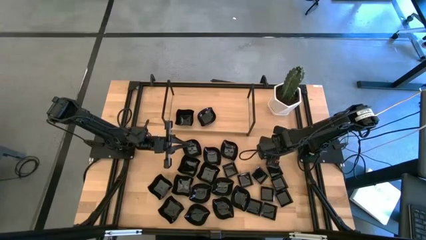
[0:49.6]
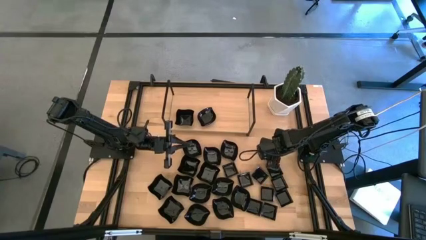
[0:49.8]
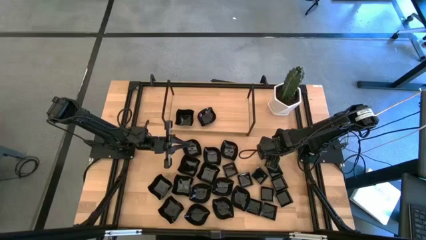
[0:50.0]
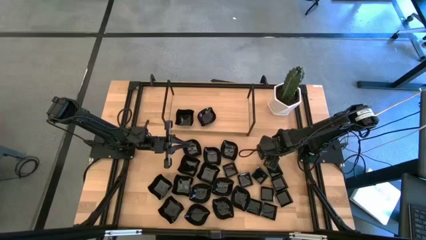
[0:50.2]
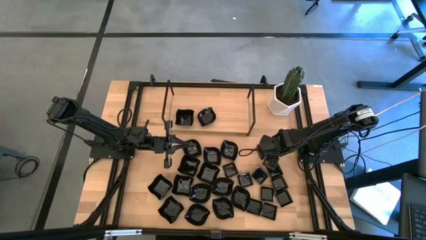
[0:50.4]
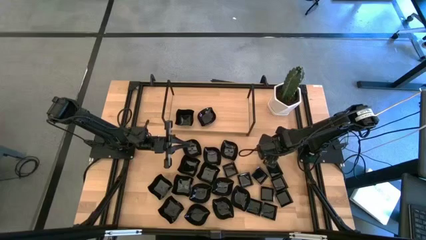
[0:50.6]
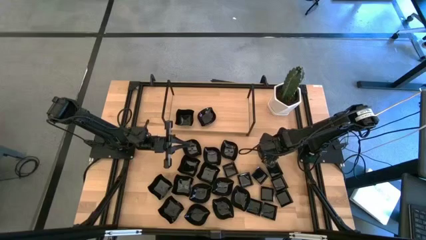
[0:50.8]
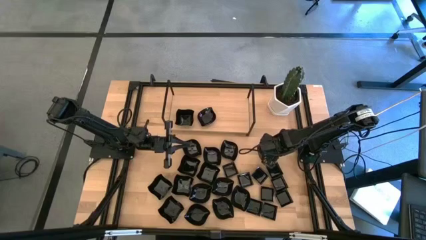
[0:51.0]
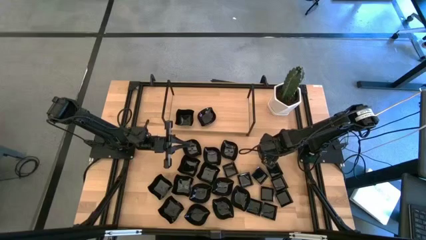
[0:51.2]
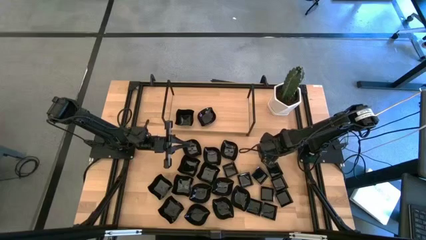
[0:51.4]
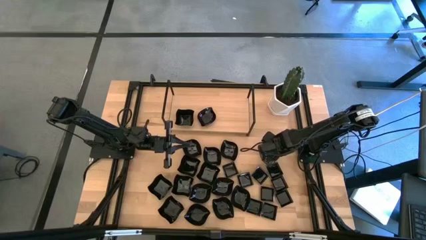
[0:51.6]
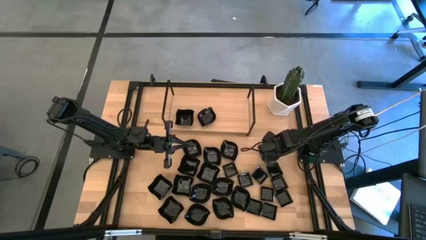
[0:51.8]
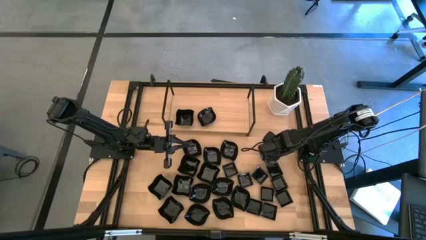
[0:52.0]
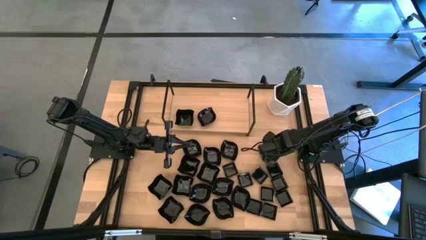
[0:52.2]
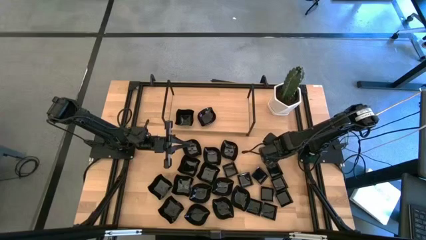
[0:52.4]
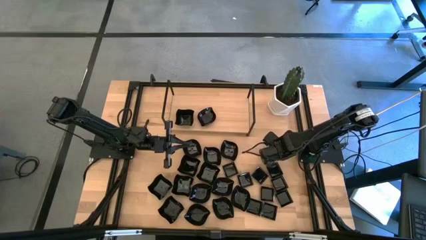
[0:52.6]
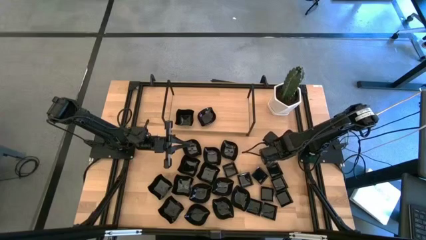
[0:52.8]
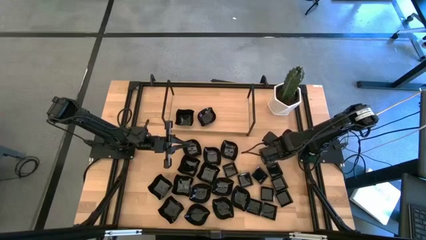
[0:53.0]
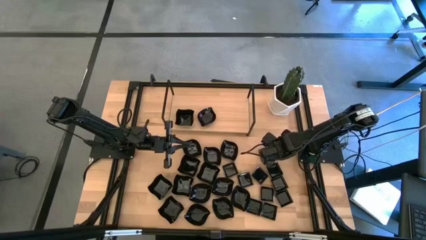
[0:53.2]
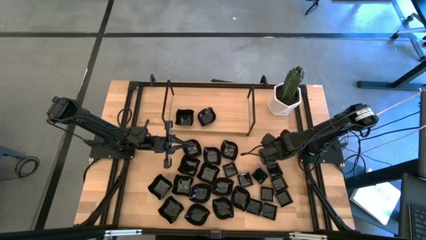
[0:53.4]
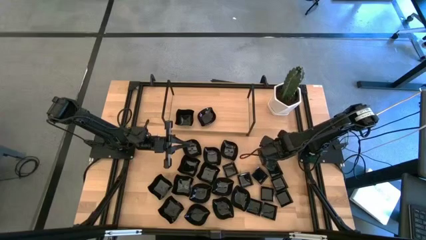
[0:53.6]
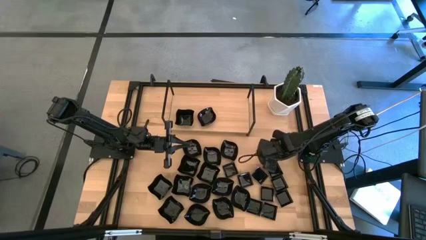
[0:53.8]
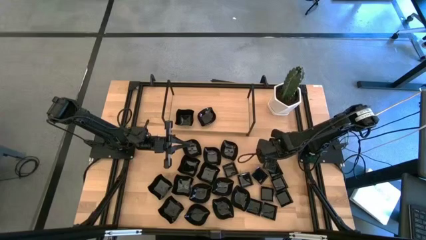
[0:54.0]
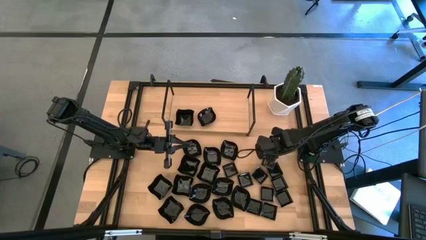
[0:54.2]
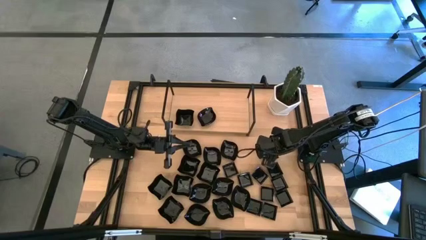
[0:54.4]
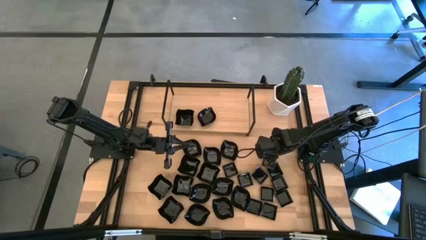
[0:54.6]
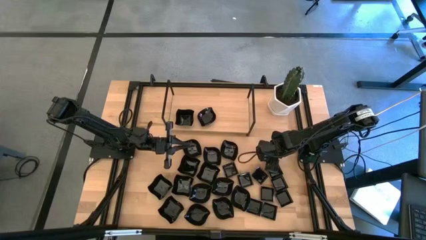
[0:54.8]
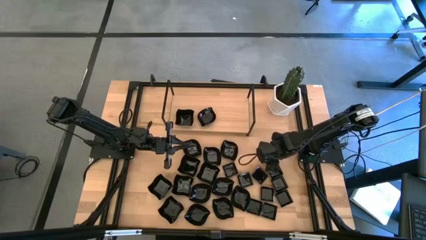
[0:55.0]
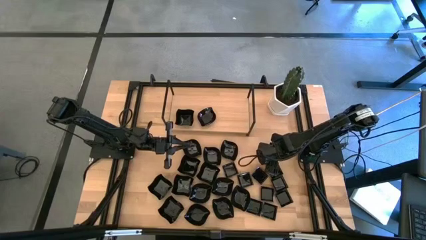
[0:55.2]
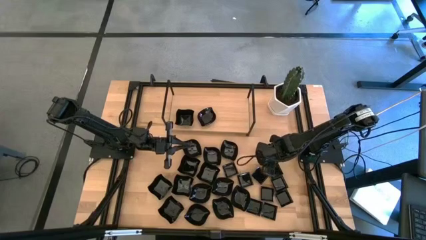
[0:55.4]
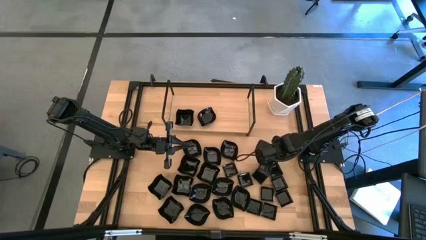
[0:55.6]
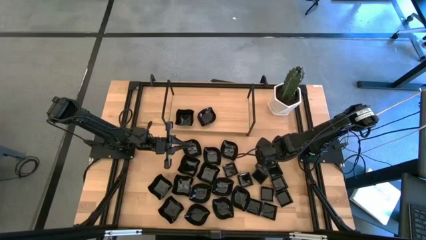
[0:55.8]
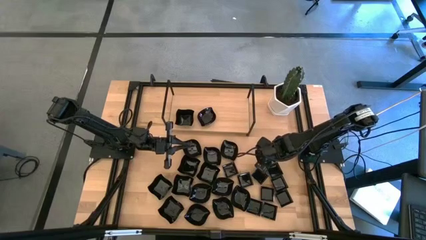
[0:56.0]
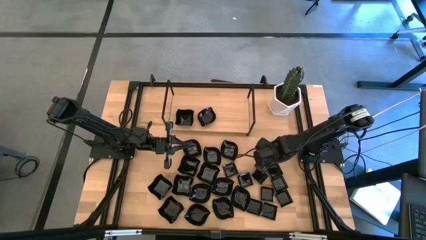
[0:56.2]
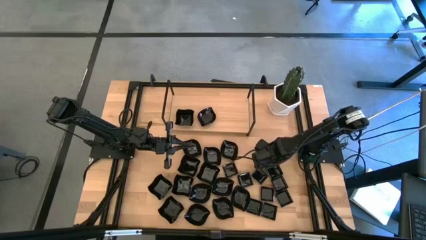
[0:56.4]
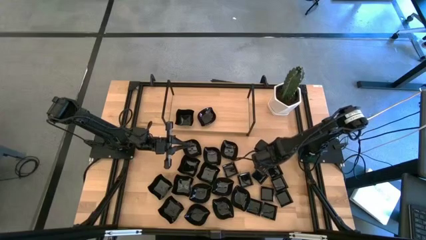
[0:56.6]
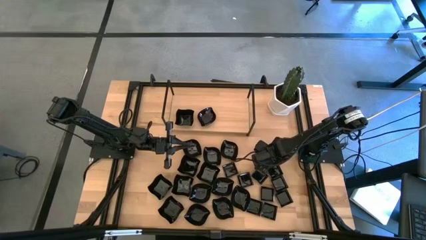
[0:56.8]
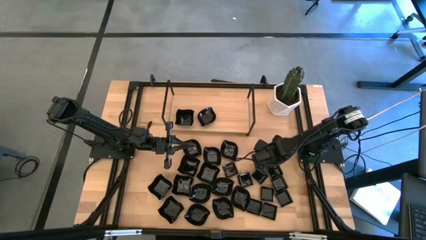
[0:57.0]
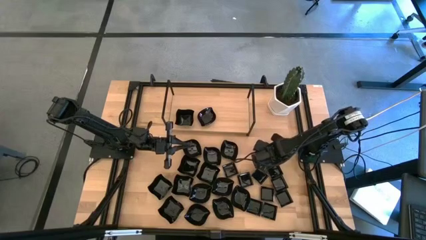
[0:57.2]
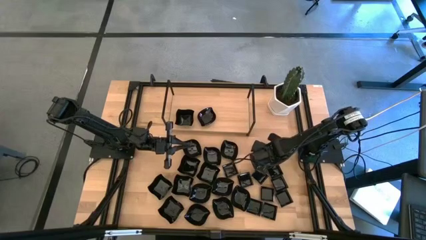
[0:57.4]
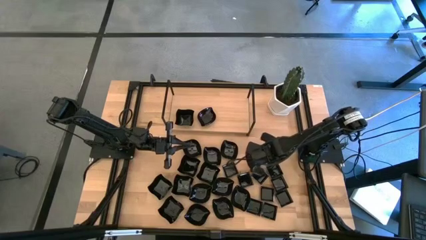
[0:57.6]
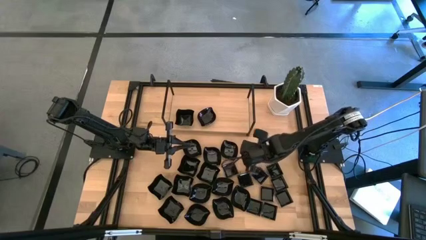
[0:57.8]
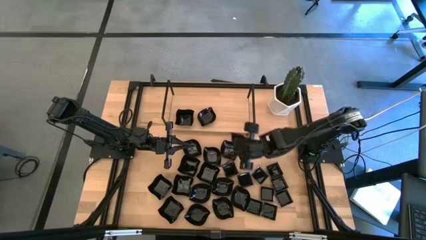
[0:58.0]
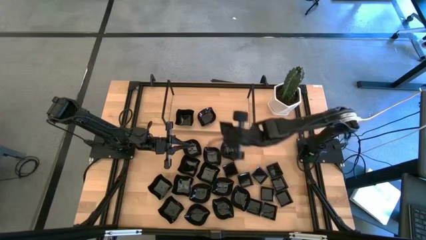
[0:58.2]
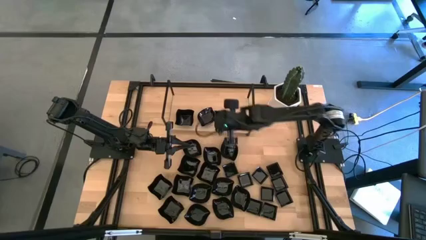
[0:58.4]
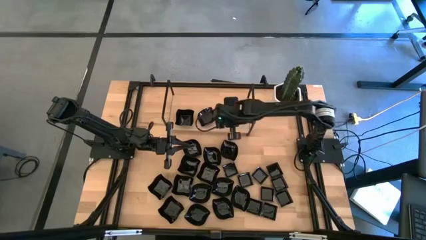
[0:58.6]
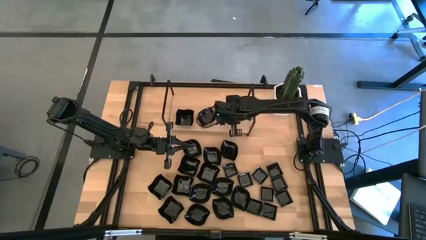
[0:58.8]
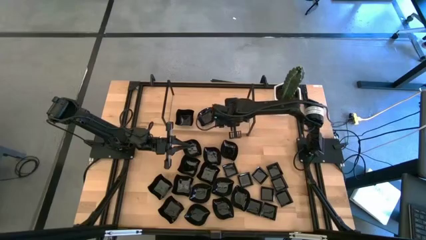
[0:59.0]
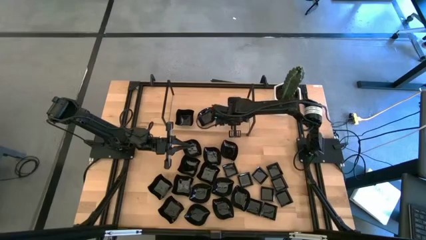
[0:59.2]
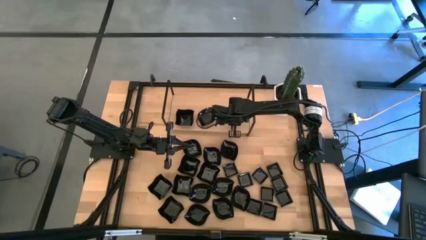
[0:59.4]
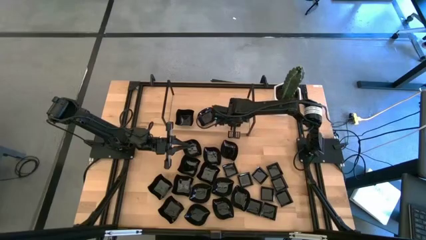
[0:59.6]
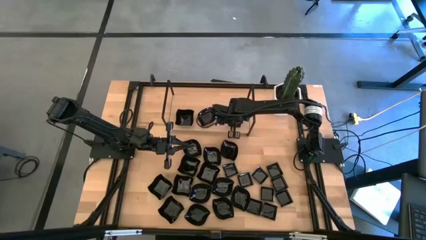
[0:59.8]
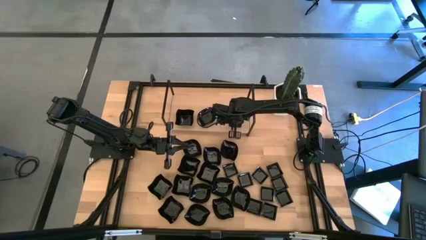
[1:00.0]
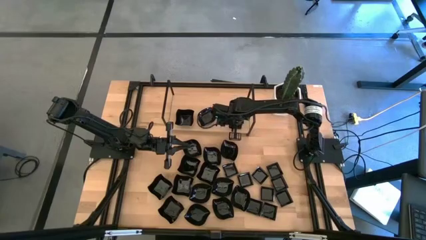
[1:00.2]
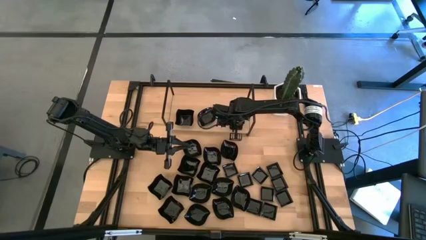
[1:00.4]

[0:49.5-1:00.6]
Task: Pick & Place Mini shaped plates
Put the square plate on the shelf

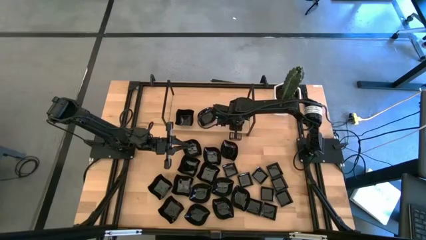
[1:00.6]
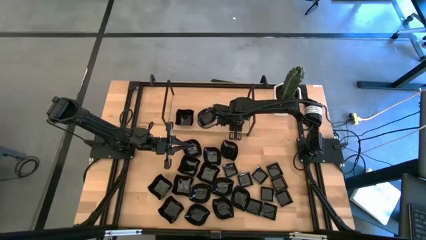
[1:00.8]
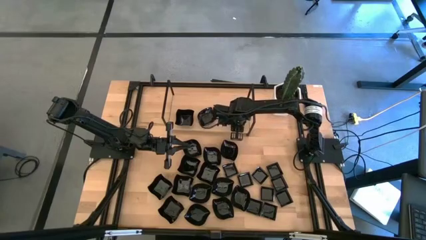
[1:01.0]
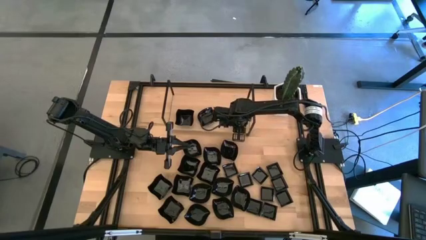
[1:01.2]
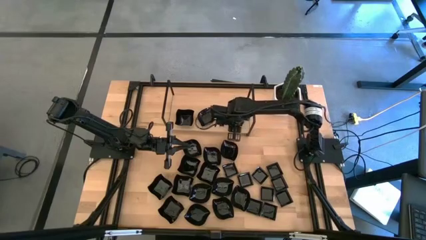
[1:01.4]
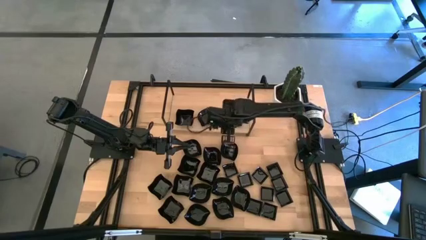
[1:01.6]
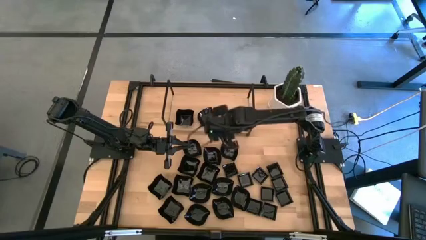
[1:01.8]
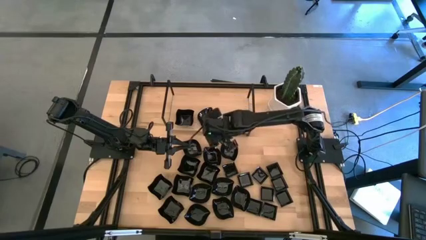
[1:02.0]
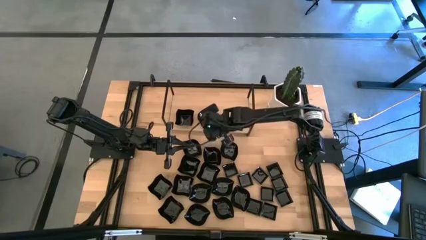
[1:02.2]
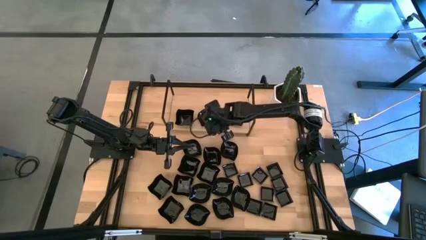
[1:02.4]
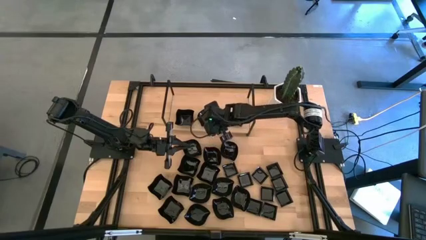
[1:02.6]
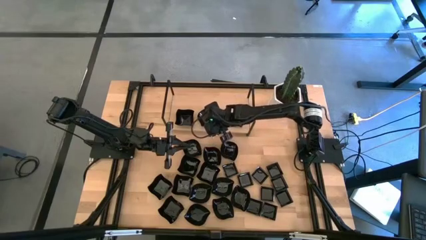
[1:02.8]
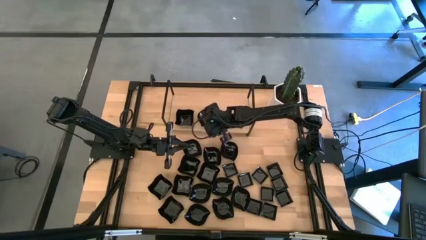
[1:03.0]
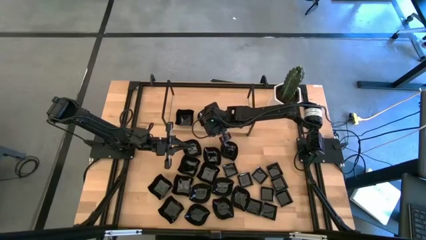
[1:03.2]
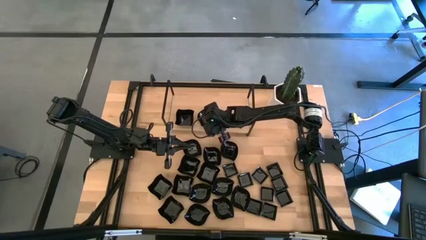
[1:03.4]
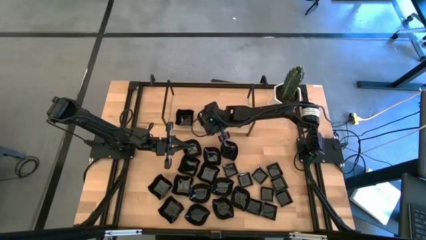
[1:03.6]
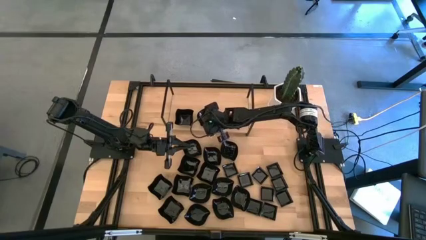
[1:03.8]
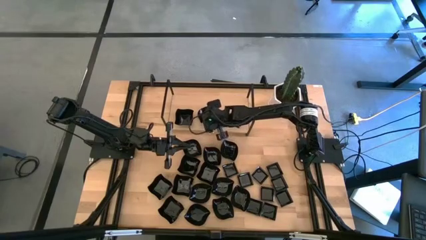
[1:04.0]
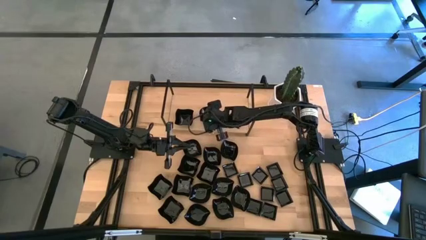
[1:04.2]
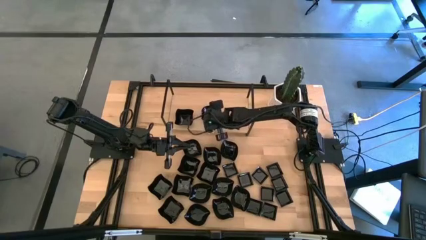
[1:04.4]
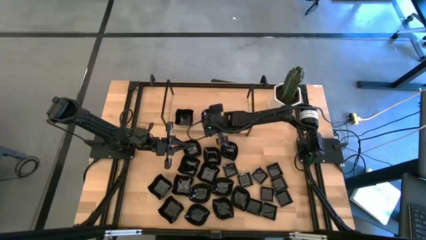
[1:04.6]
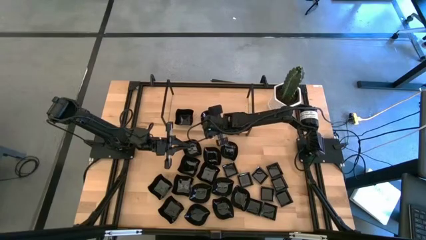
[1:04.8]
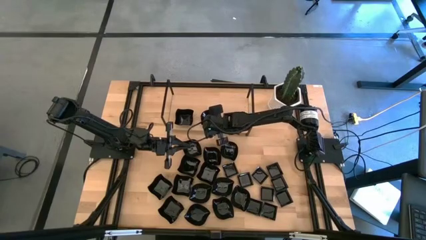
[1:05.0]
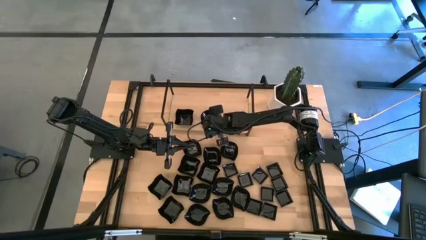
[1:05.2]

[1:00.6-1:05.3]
Adjust the leaf-shaped plate on the shelf
